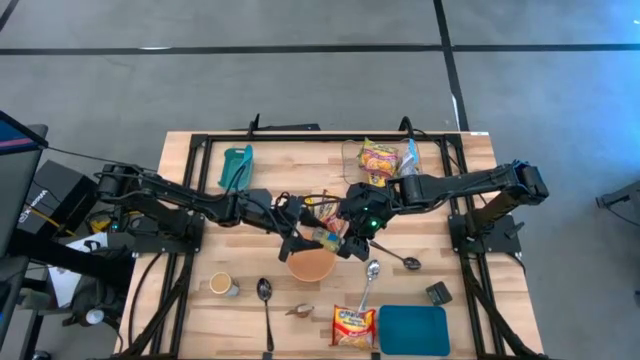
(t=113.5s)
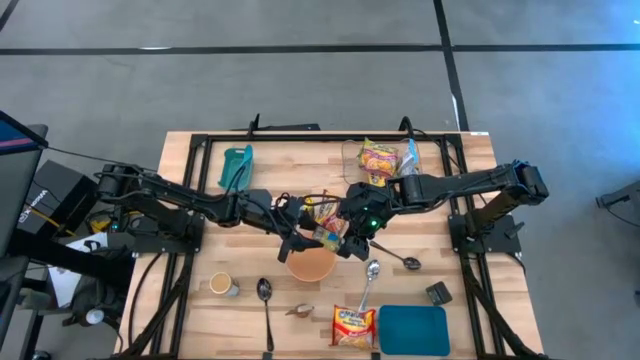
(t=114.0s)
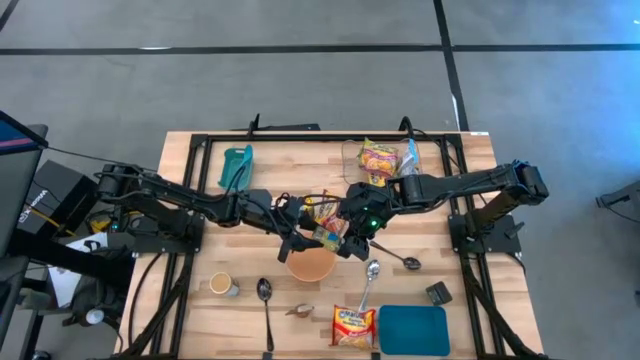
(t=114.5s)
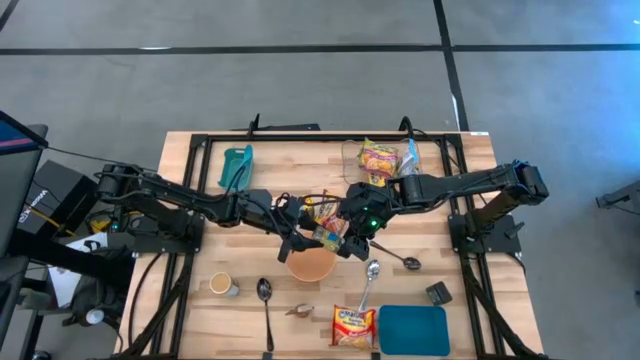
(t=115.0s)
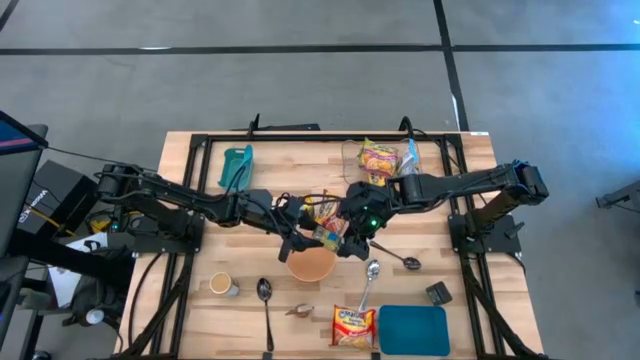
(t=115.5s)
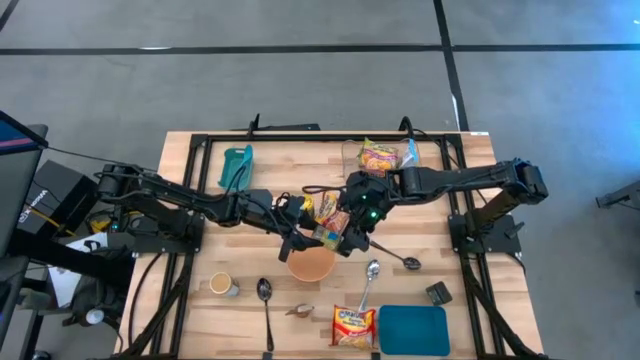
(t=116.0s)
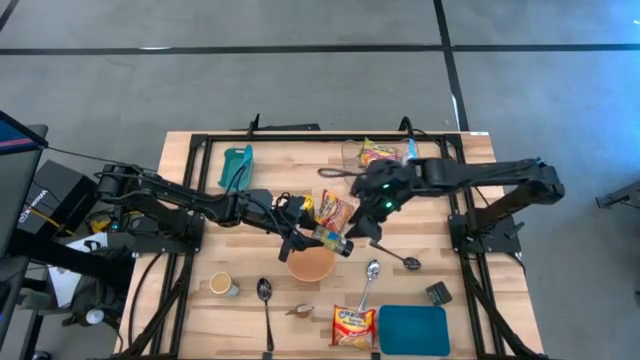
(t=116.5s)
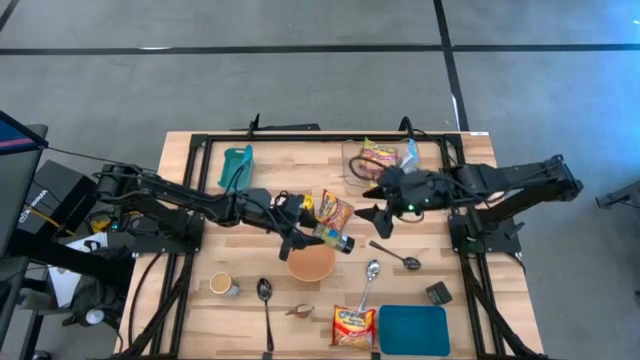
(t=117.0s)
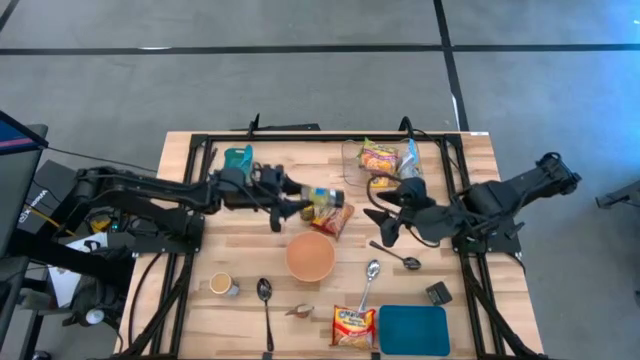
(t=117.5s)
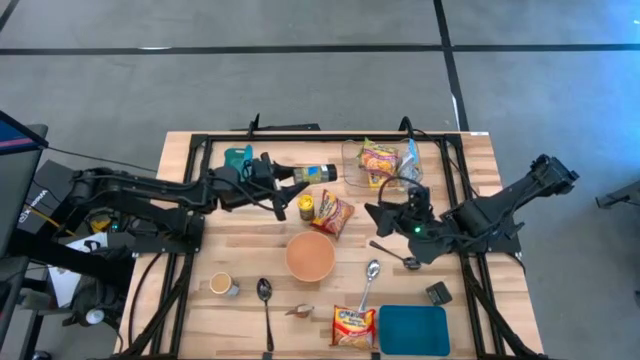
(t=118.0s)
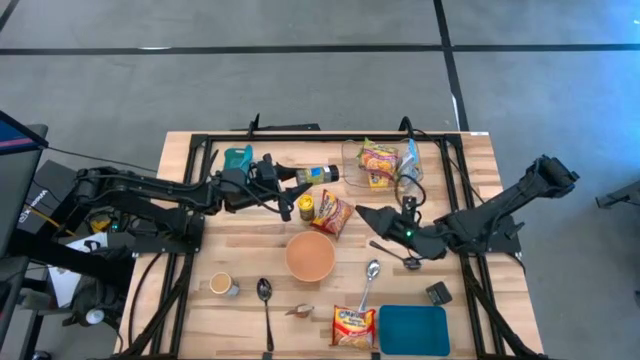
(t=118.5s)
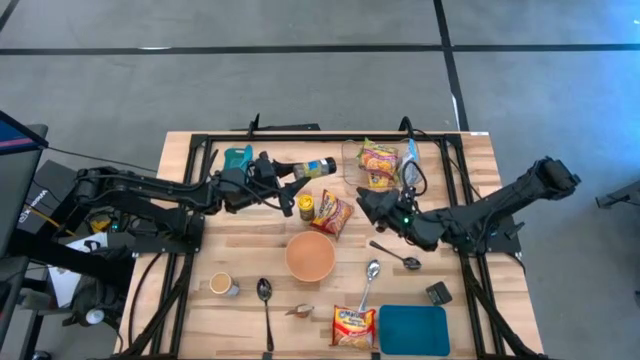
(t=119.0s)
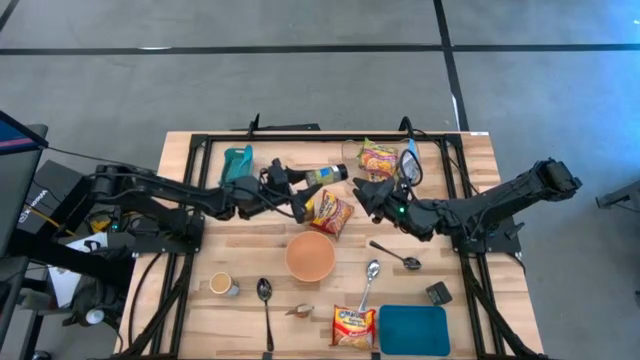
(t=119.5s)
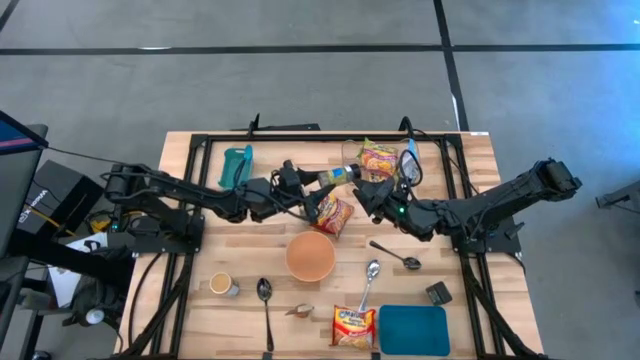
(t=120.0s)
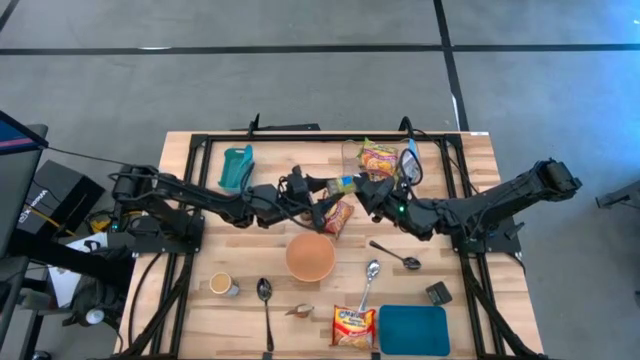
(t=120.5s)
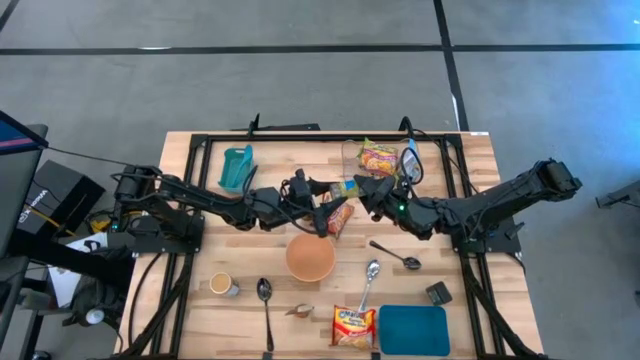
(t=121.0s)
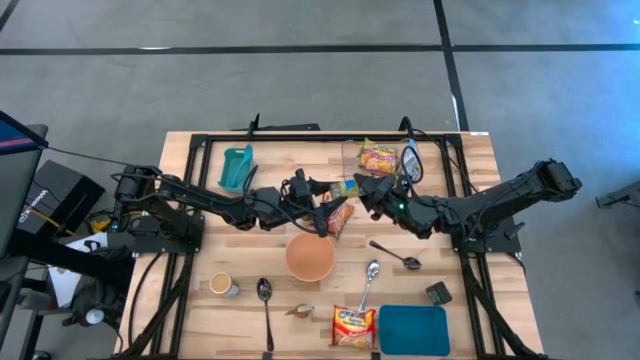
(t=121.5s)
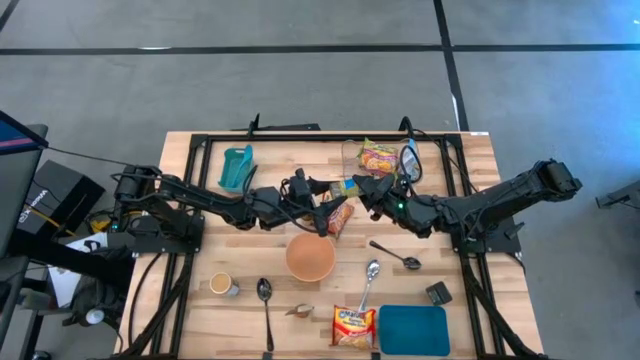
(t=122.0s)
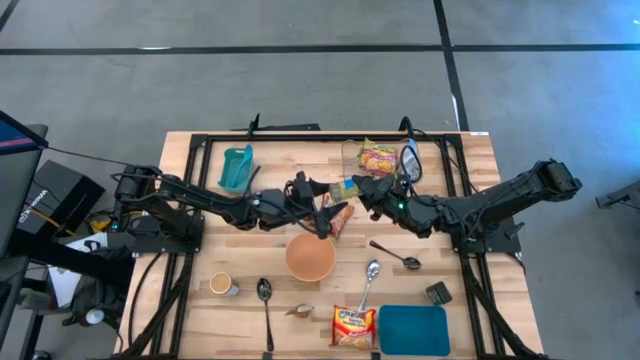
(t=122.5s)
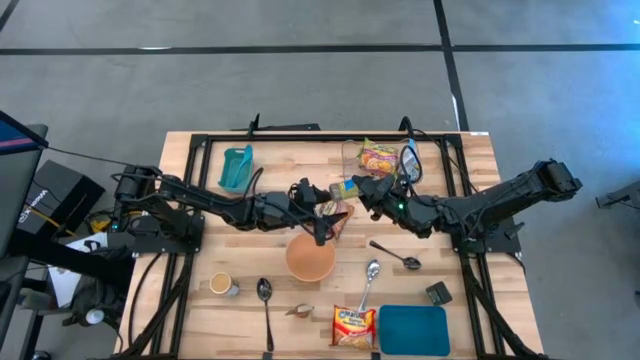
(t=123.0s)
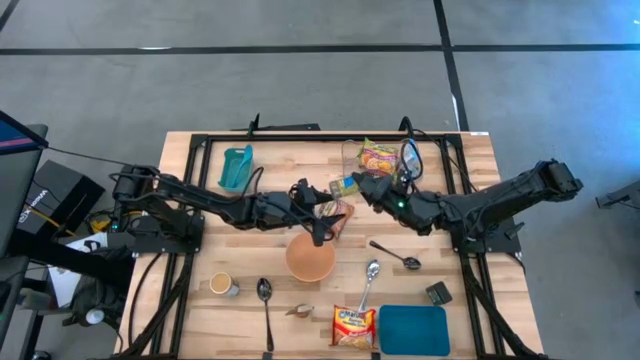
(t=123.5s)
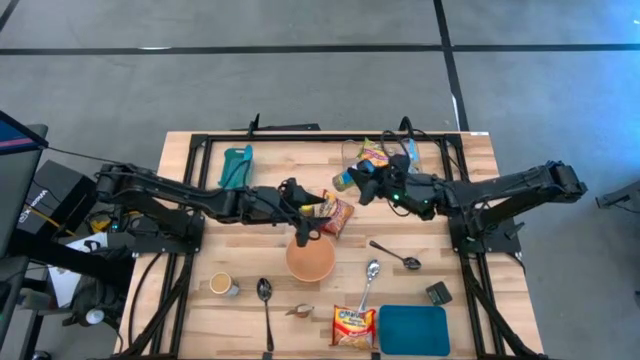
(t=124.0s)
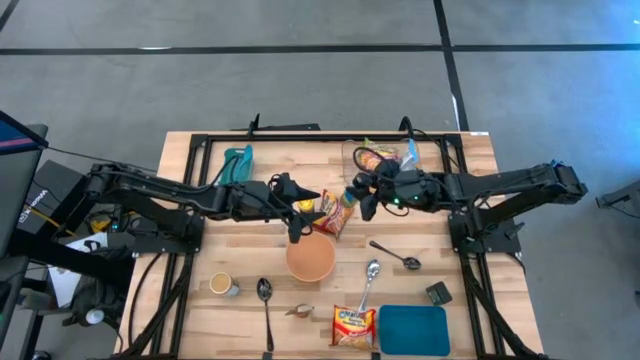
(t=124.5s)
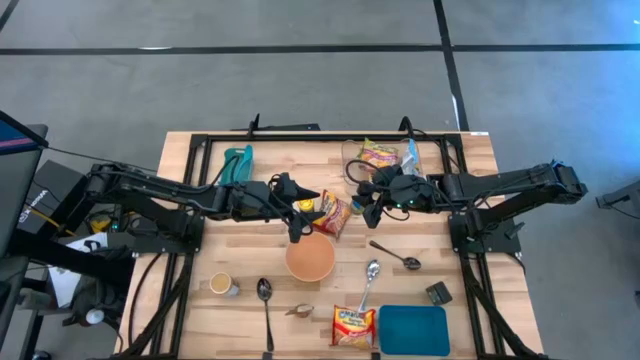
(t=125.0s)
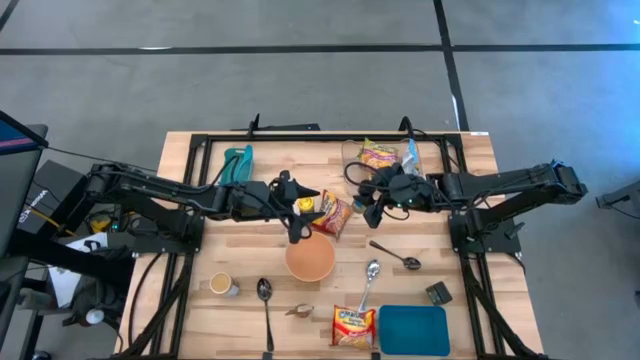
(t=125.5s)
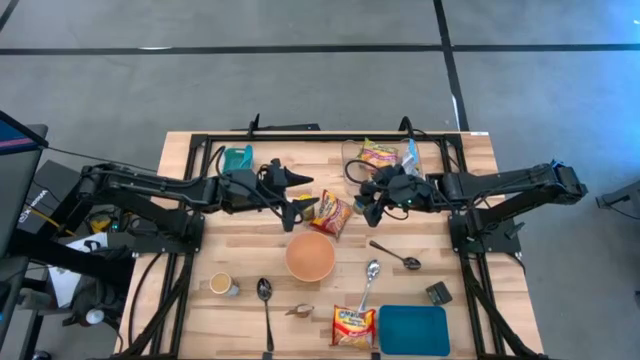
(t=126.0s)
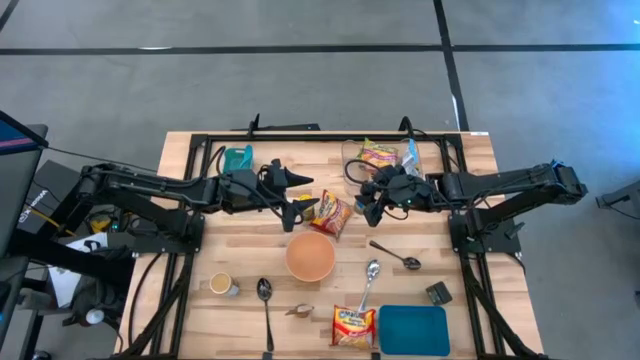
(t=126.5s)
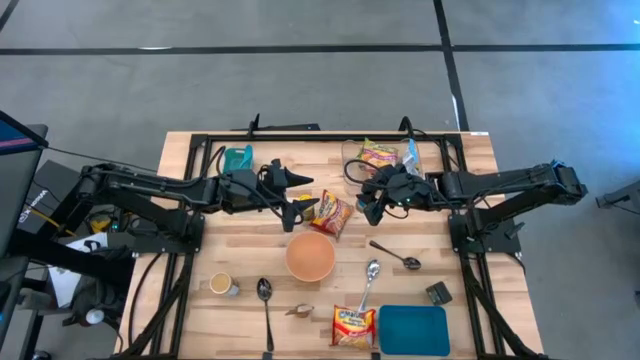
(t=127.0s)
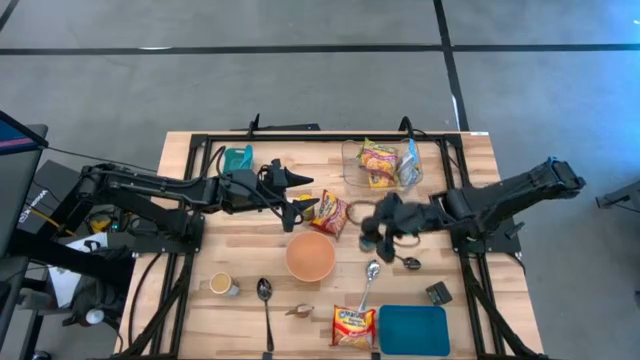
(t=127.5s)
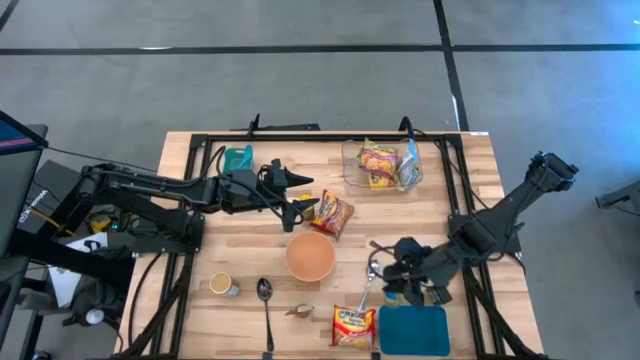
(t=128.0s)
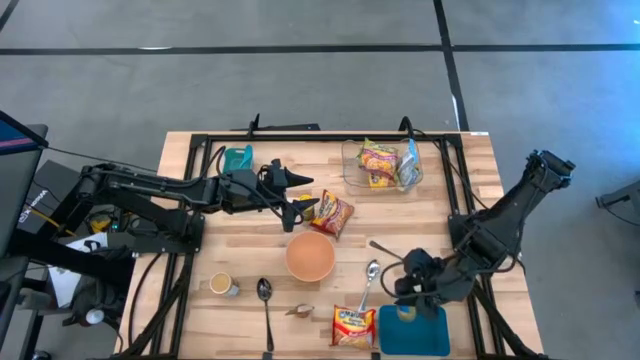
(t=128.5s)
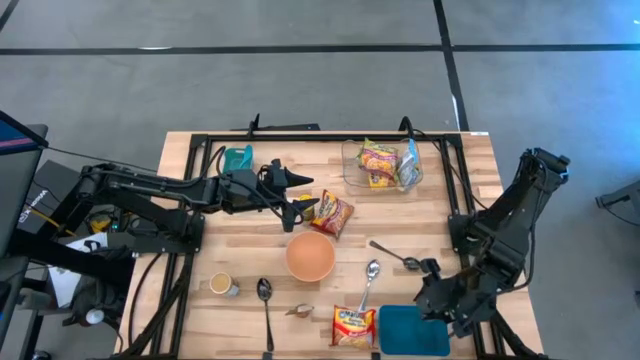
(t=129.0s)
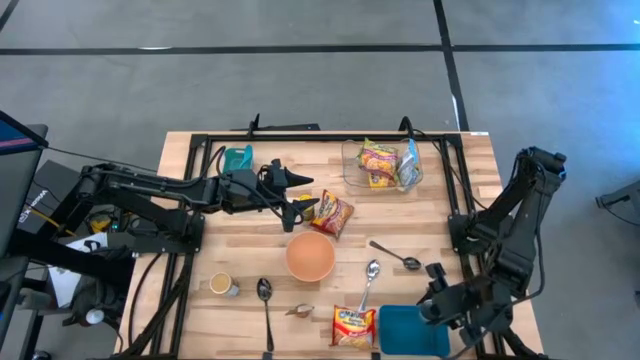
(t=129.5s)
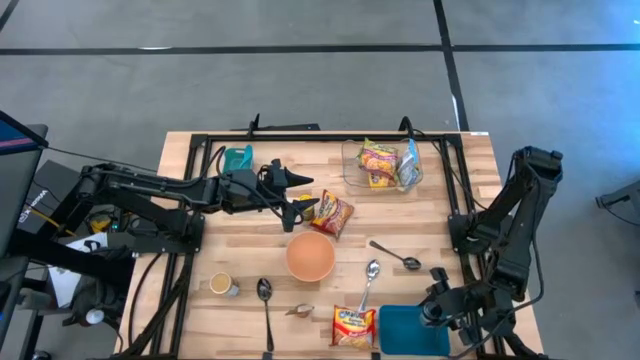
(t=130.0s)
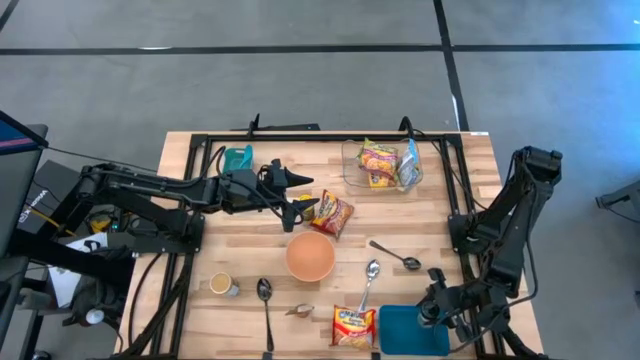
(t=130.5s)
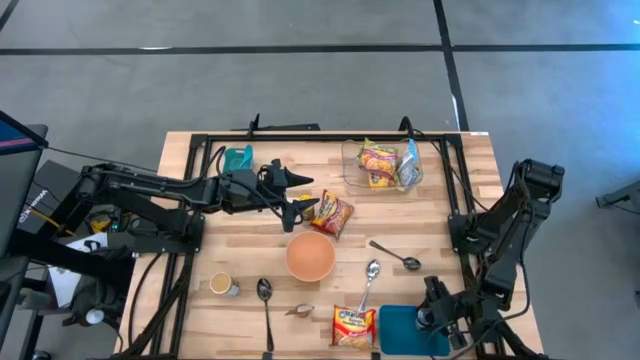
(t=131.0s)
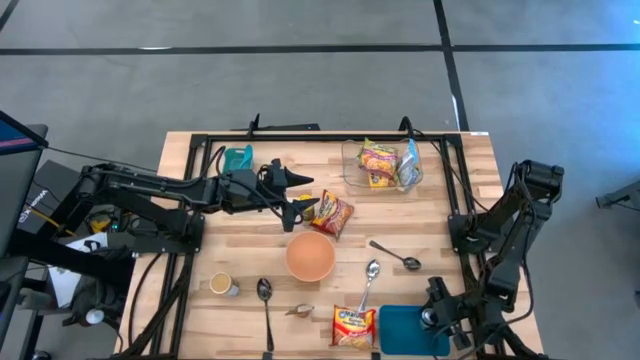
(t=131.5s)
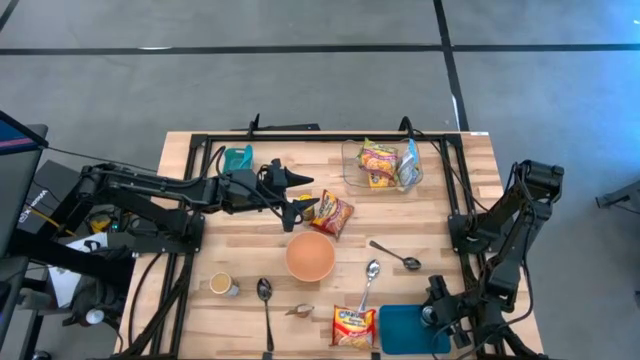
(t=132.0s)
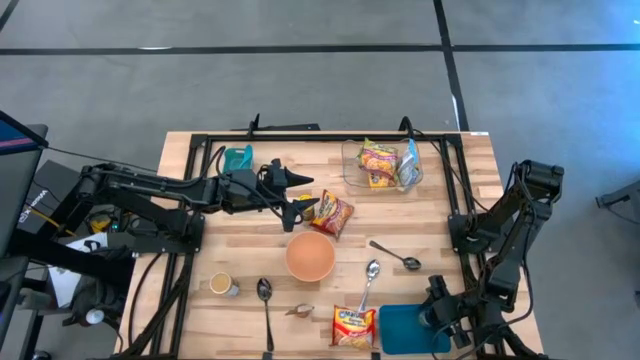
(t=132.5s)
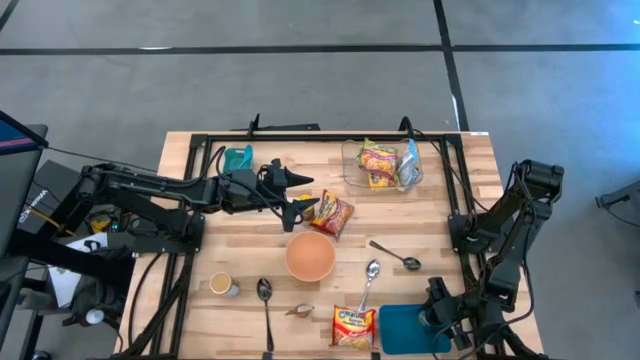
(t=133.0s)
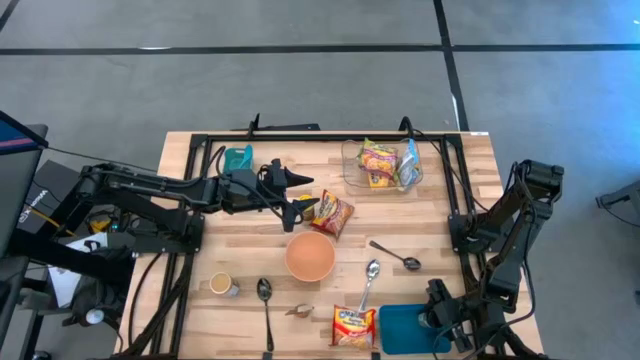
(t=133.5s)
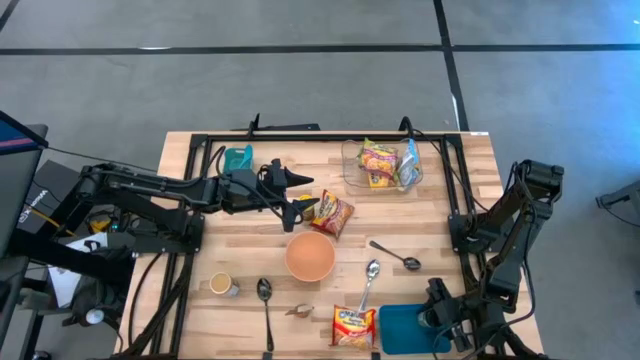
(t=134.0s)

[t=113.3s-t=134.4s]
Task: Pick & Place Food Item
Put the black seasoning bottle into the dark blue bin
